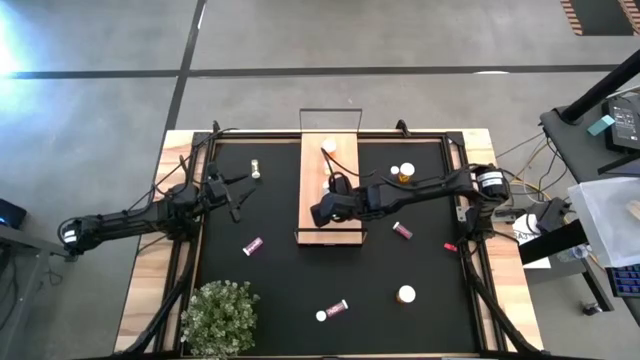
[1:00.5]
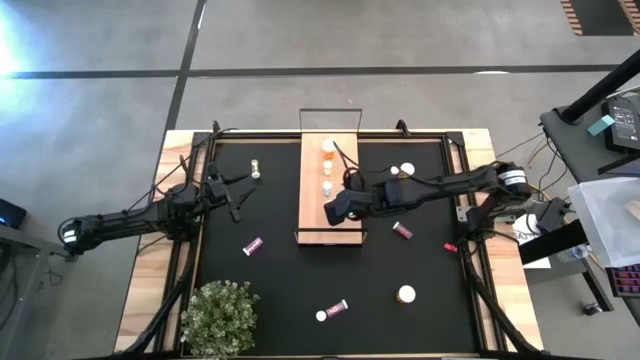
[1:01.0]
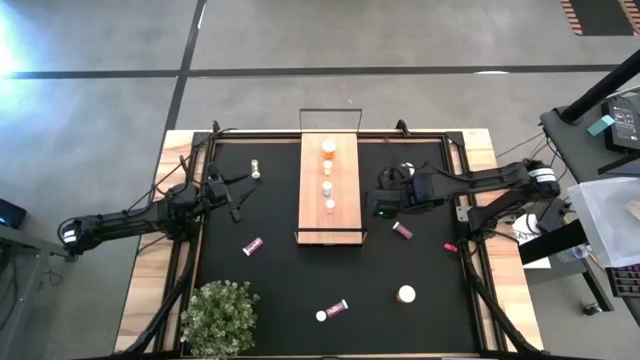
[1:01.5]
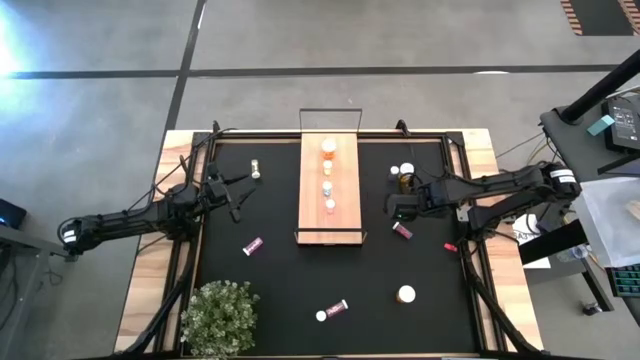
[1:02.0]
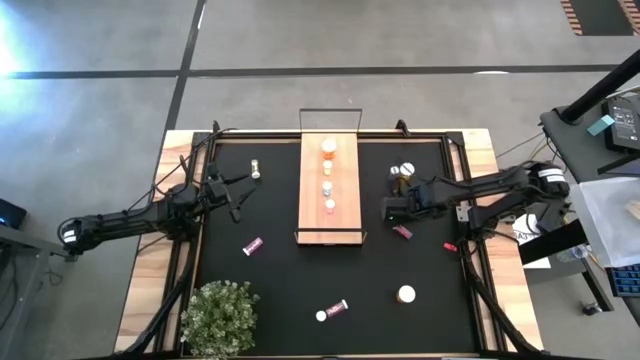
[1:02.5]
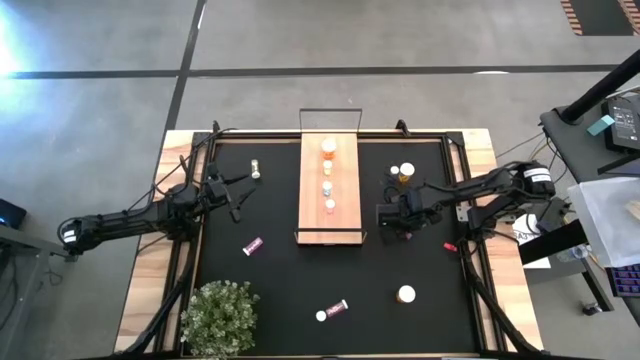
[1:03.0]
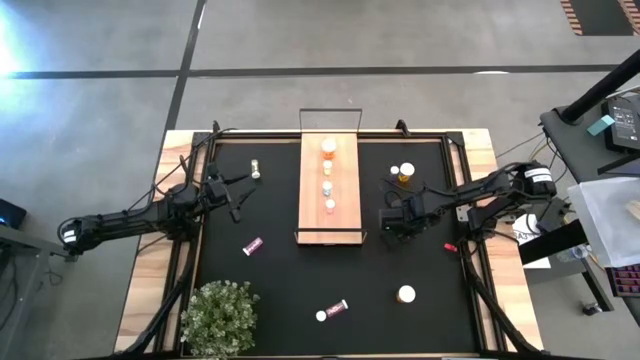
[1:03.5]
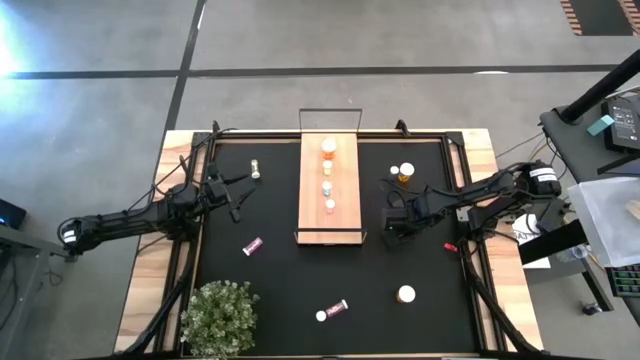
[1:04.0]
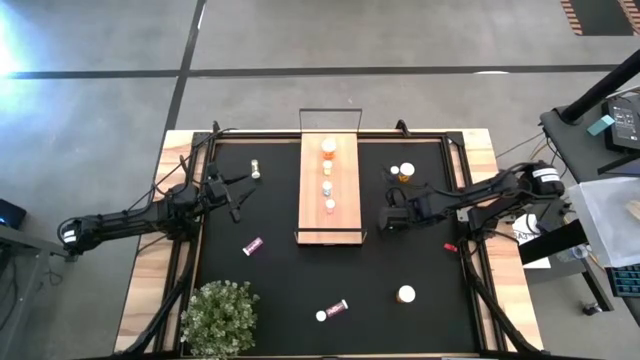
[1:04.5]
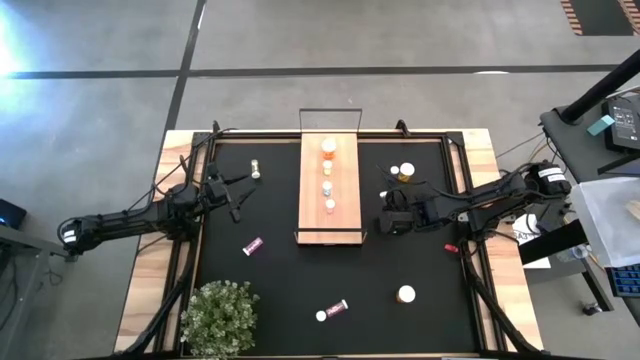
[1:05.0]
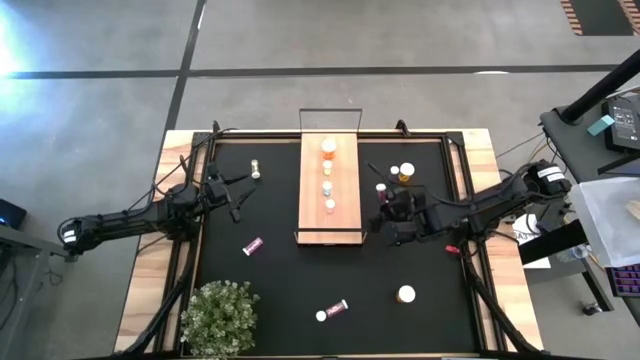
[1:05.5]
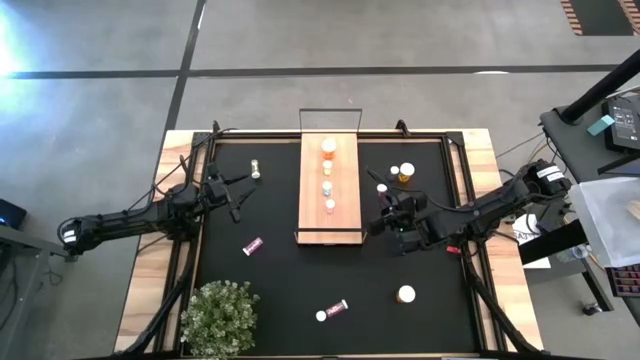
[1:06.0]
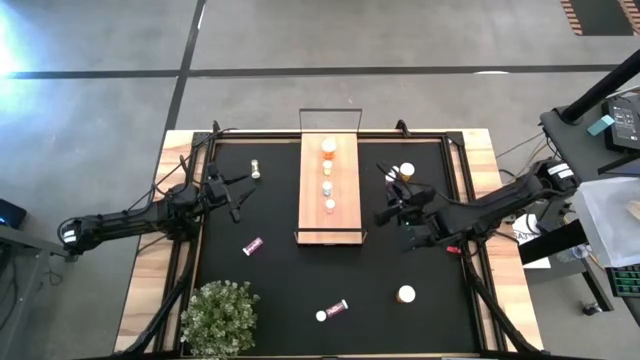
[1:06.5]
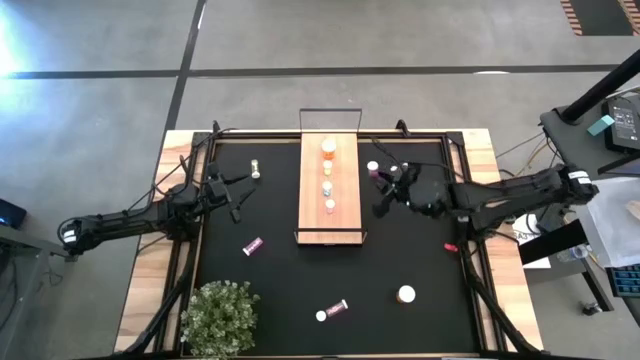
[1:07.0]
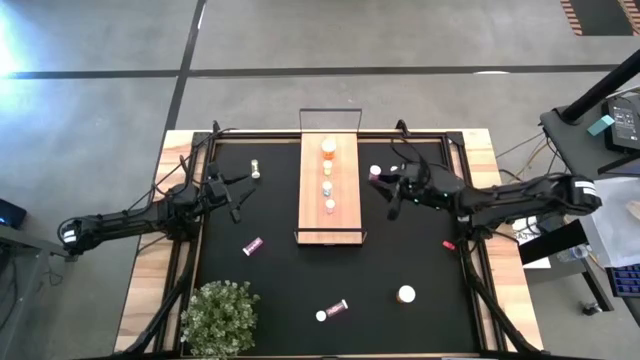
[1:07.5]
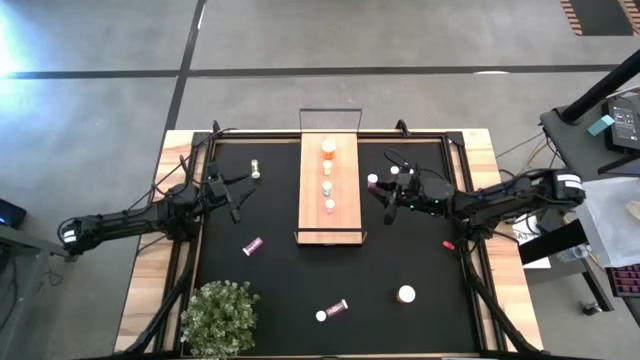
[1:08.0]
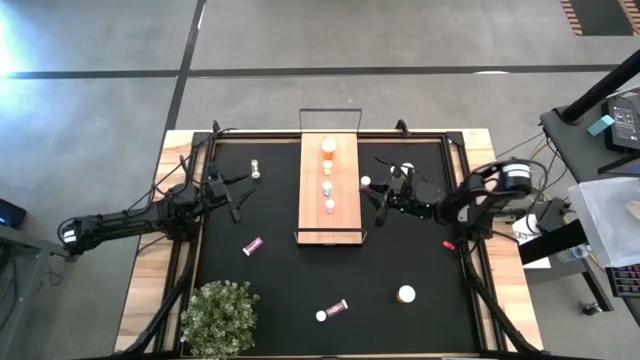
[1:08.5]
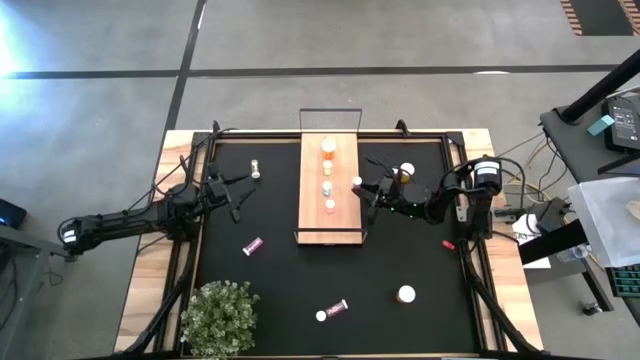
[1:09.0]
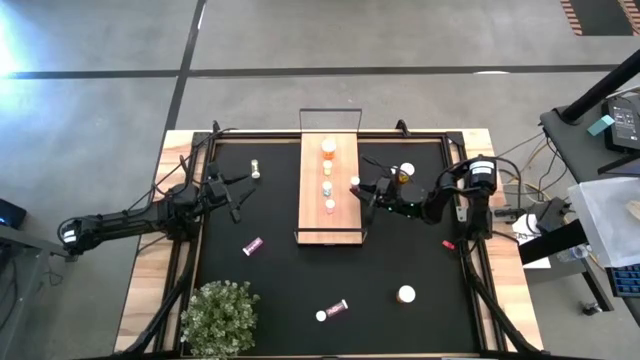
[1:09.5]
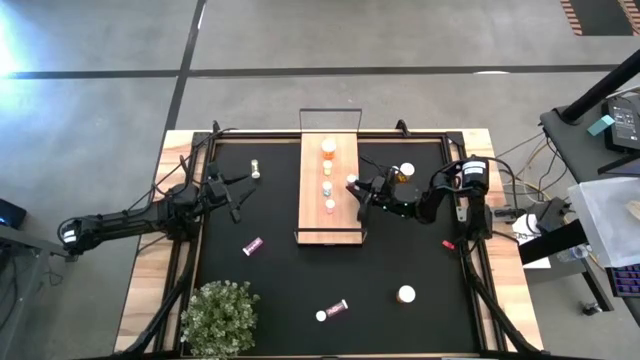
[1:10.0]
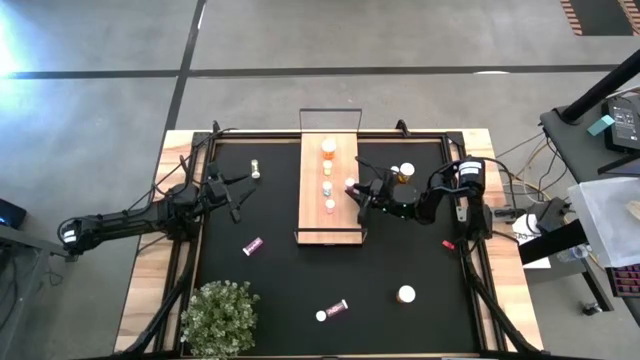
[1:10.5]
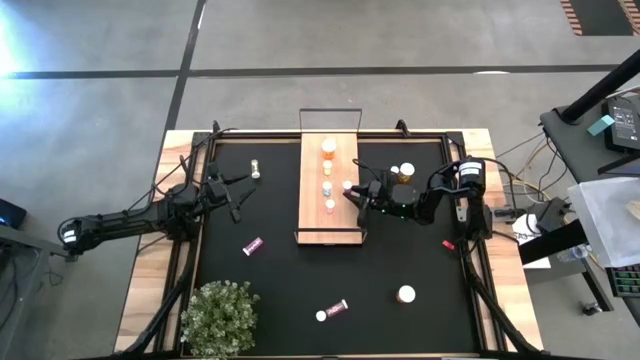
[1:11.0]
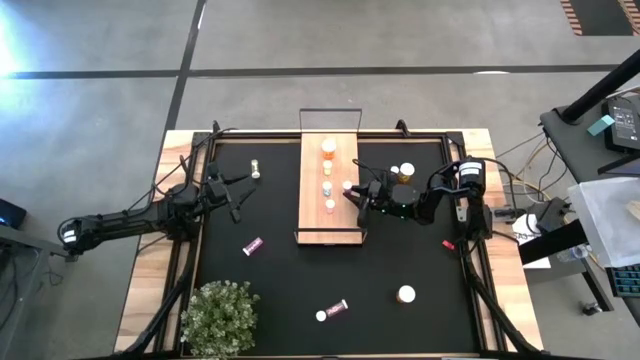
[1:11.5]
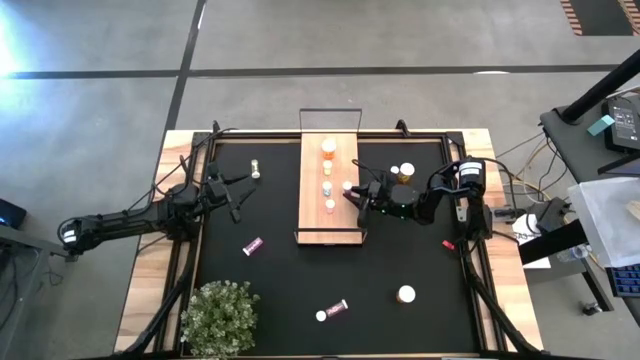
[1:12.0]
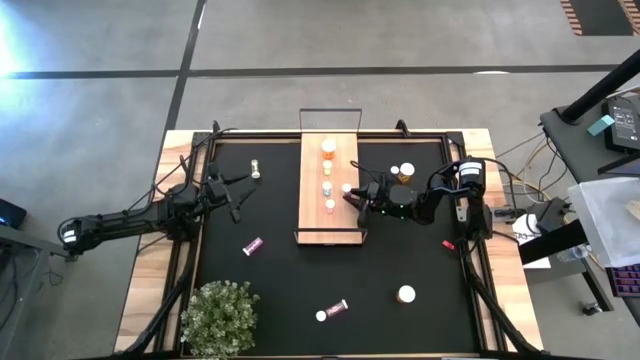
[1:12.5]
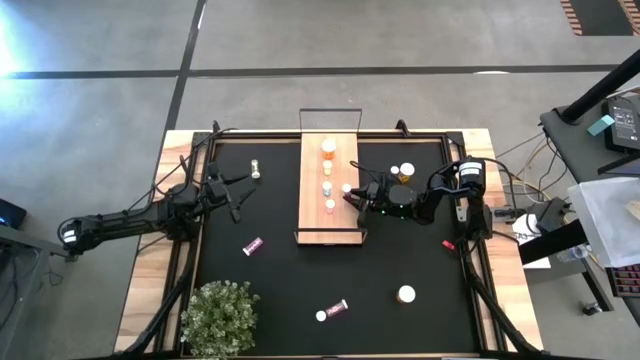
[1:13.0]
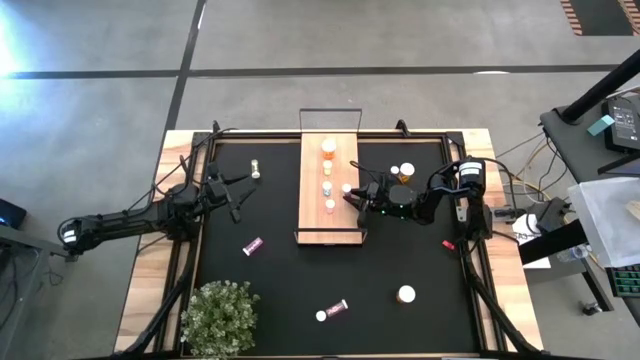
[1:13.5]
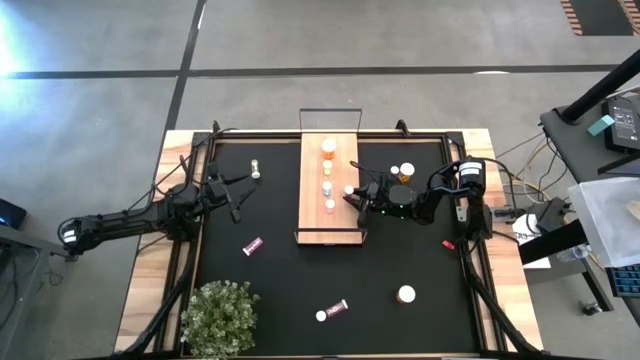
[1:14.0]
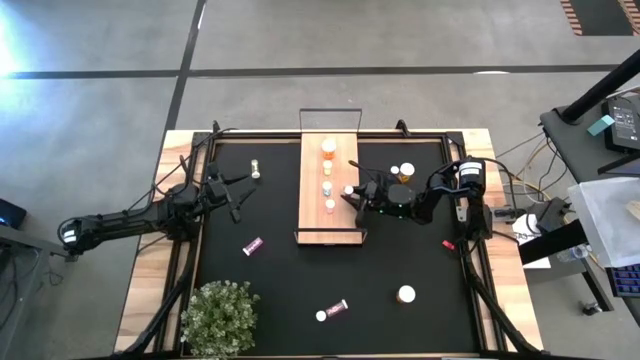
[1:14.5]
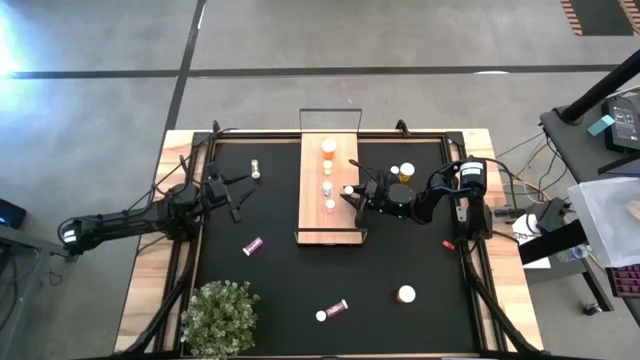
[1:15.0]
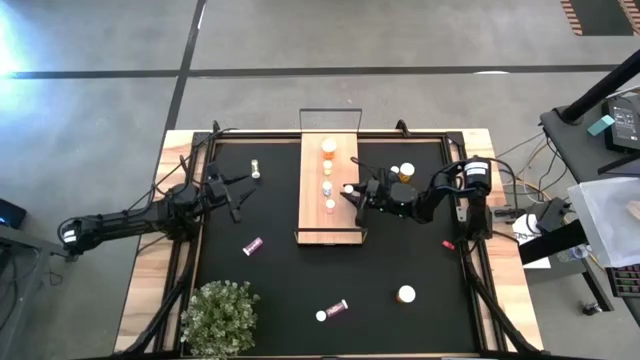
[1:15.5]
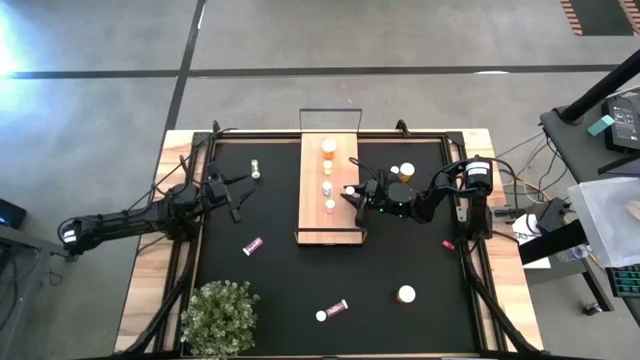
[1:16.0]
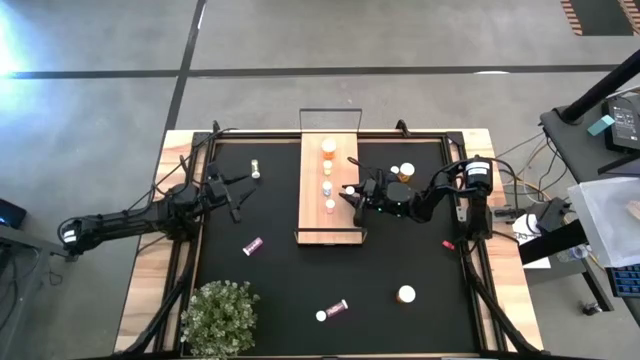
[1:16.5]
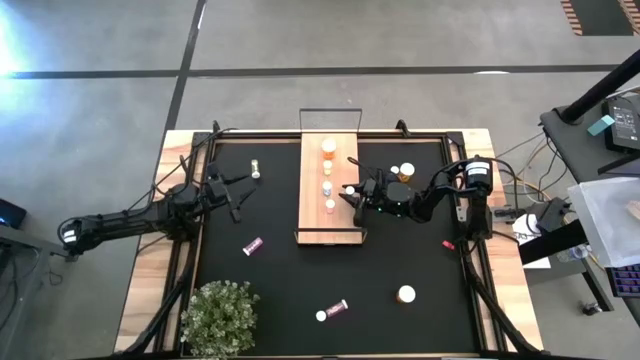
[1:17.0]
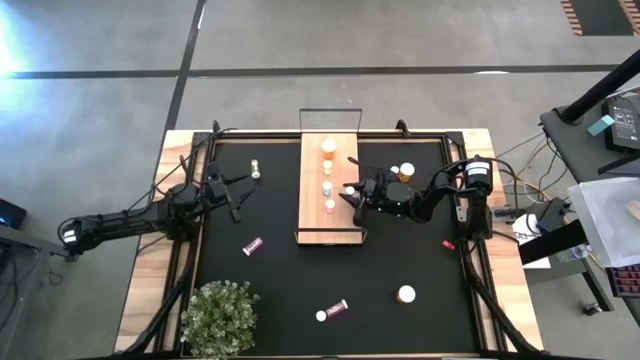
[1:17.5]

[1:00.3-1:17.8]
Task: Pick and place medicine bottles onto shelf by color
Put the bottom blue medicine bottle on the shelf aligned with the other blue medicine bottle

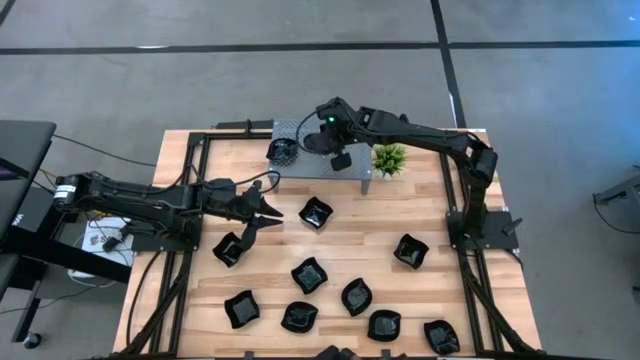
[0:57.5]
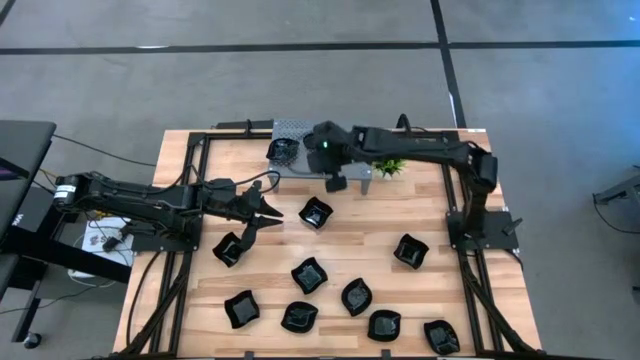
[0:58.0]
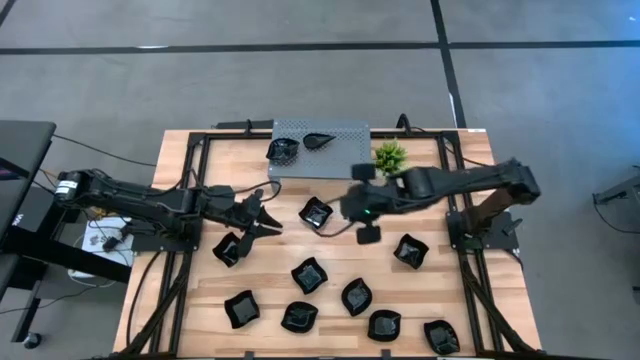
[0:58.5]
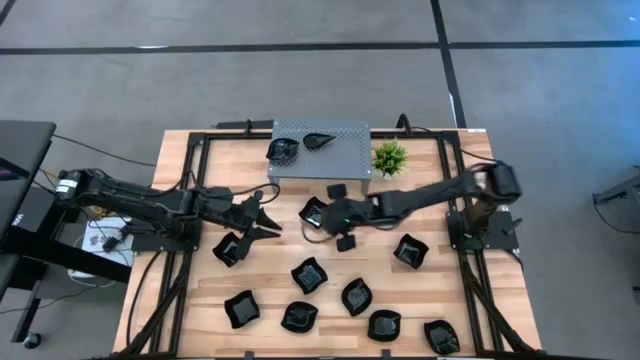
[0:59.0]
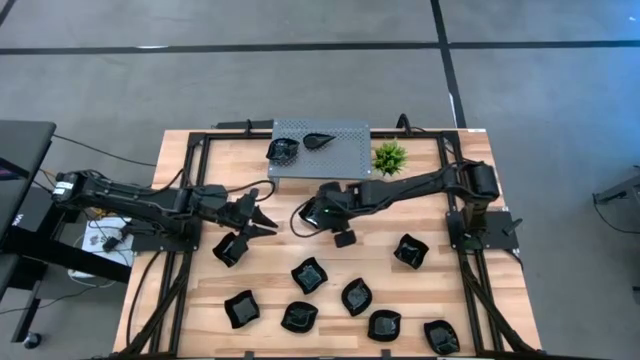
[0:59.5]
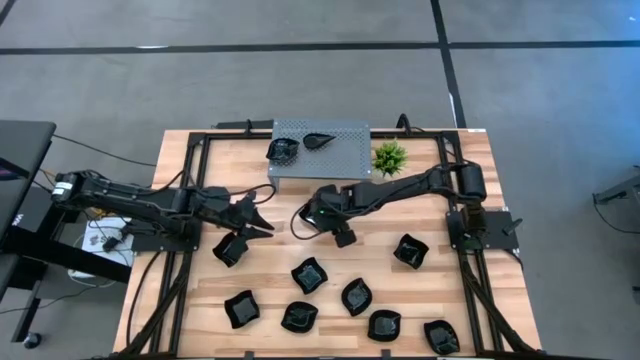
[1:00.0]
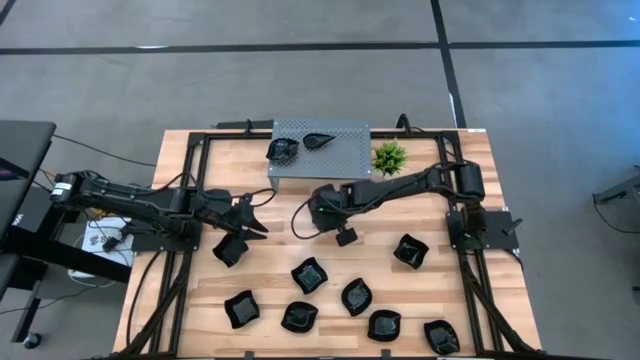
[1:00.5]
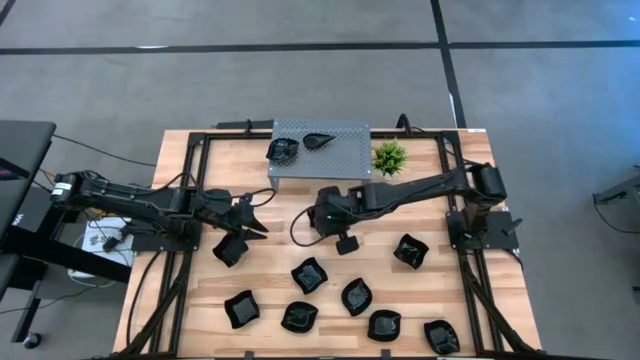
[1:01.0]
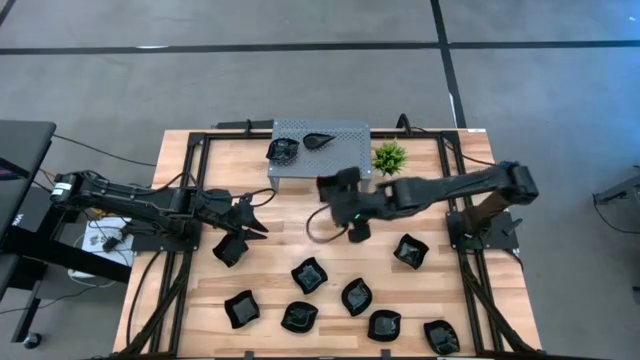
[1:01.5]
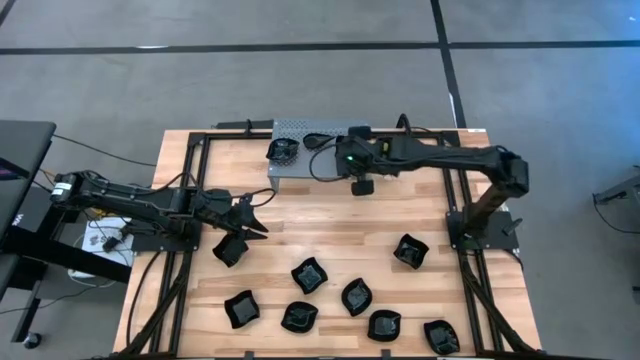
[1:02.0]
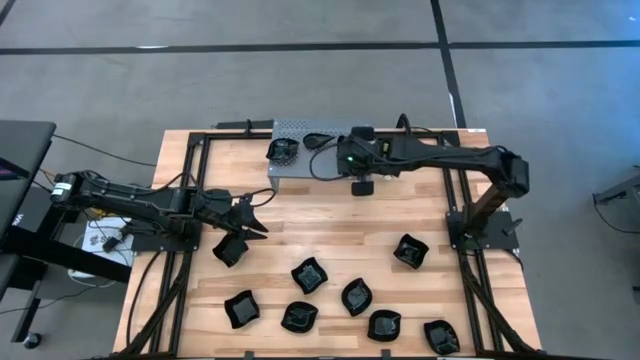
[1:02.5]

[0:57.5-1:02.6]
Task: Pick & Place Mini shaped plates
Put the distorted square plate on the shelf
